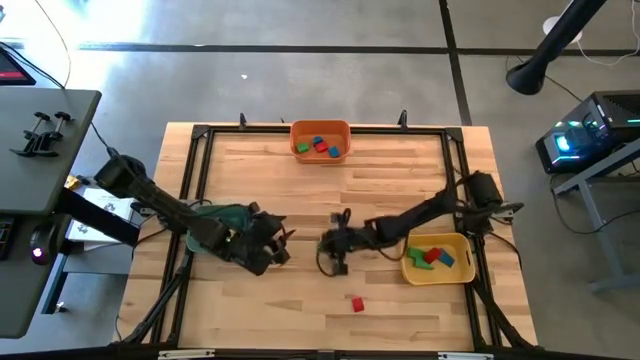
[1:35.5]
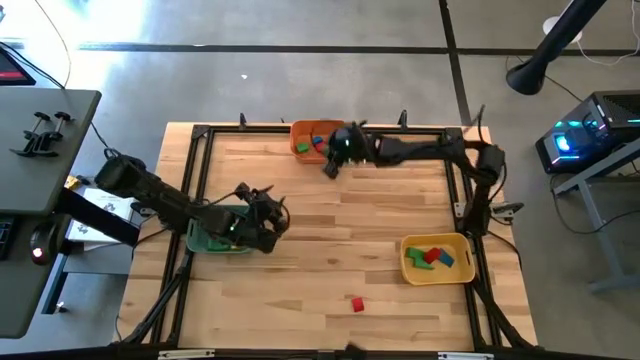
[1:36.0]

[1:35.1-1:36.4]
Task: Sort blocks by size
Put the green half cylindrical block into the orange bin

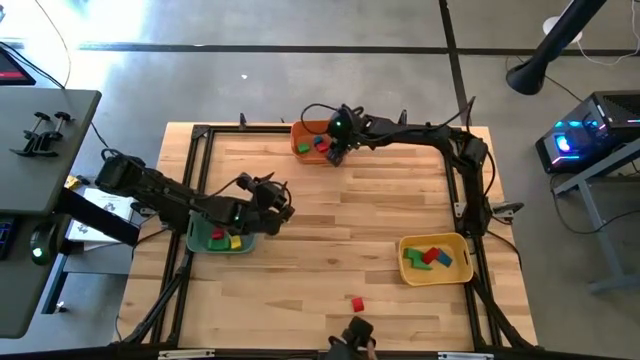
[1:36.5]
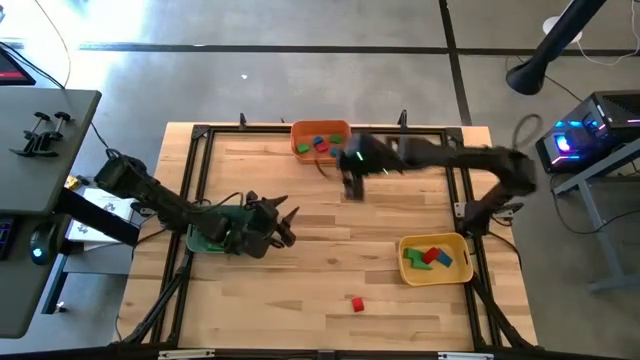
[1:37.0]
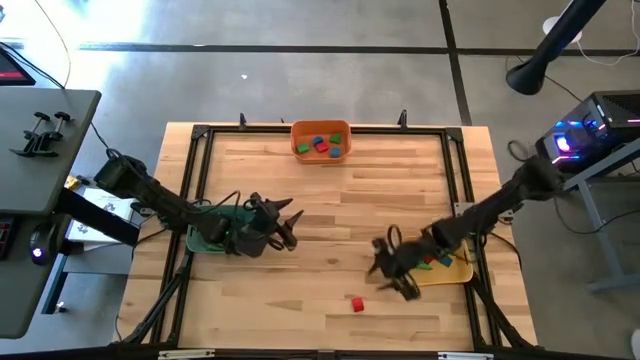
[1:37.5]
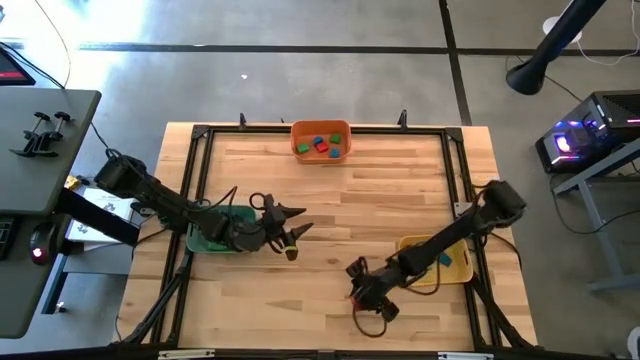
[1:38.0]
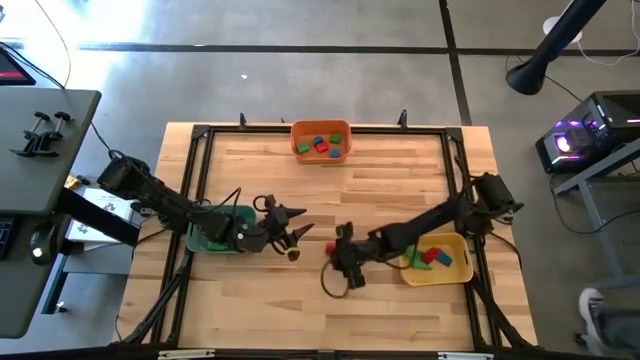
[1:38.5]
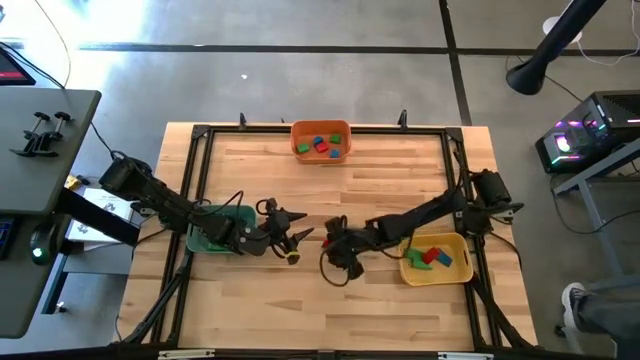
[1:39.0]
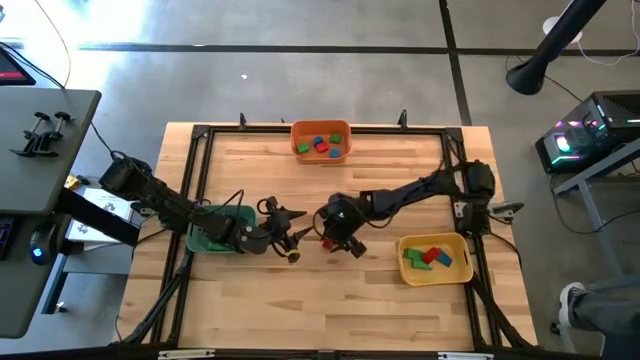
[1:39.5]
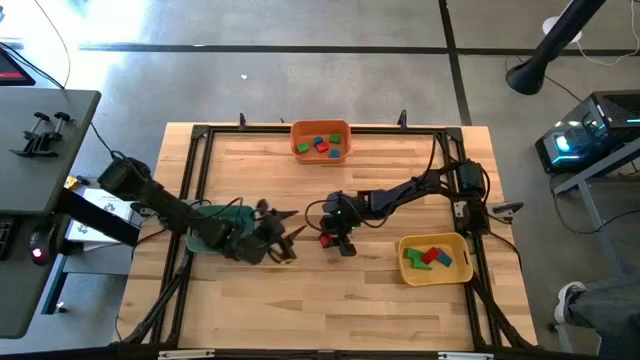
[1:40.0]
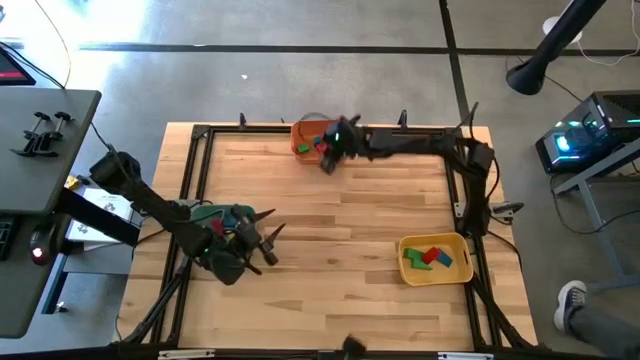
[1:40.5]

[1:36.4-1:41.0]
Put the red half cylindrical block into the orange bin

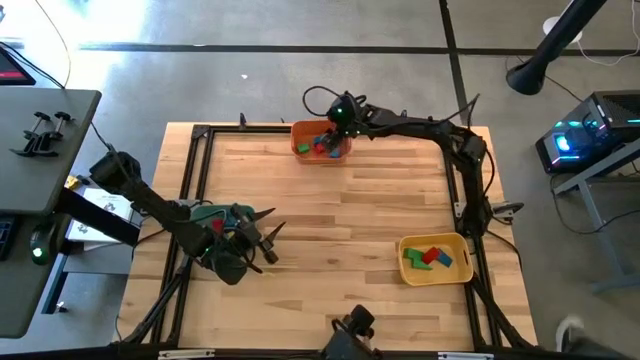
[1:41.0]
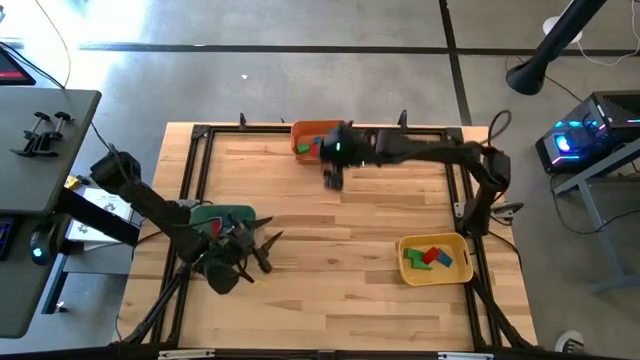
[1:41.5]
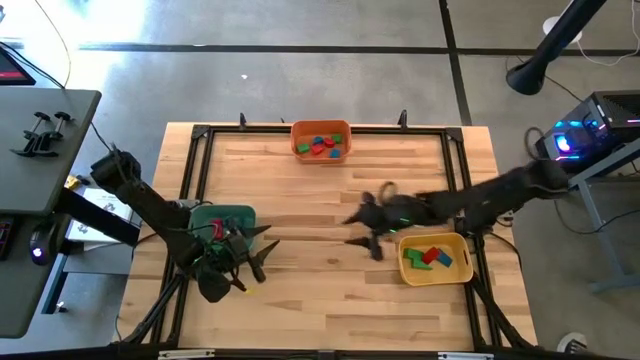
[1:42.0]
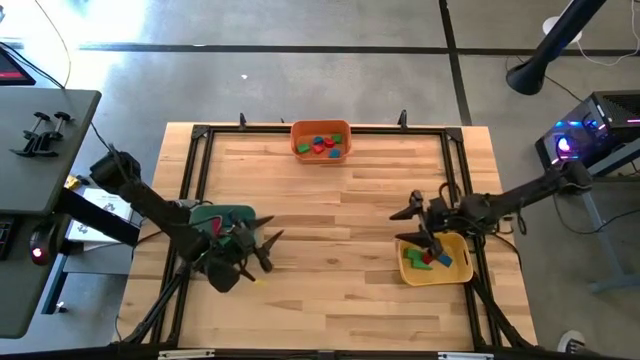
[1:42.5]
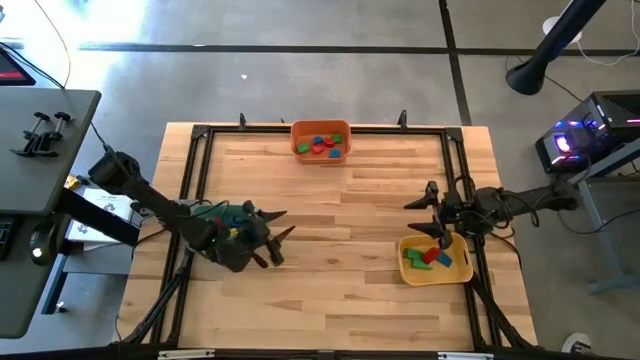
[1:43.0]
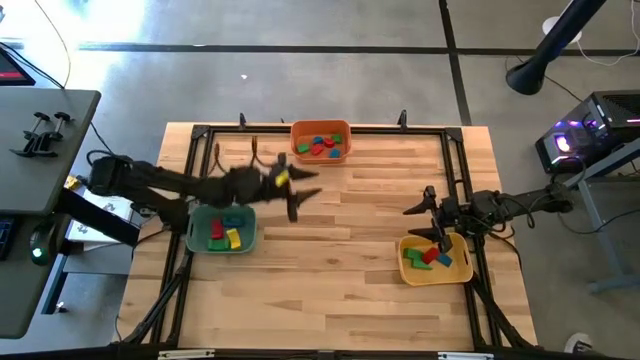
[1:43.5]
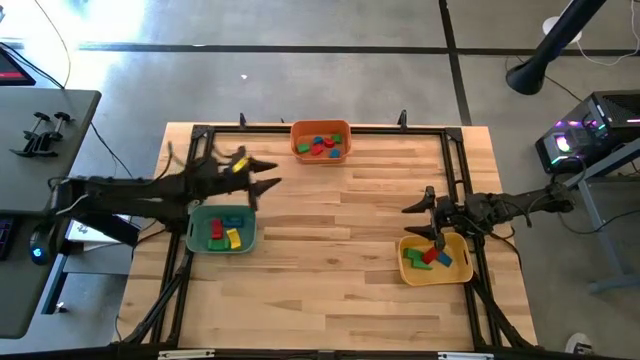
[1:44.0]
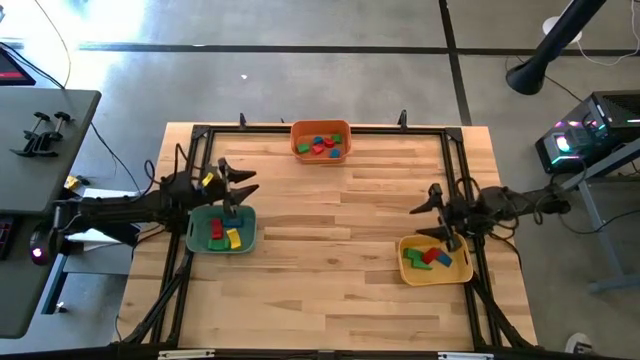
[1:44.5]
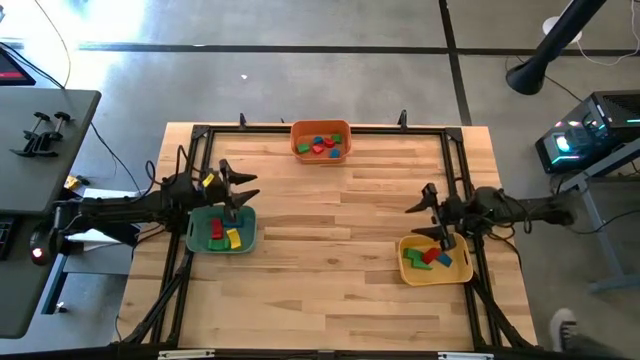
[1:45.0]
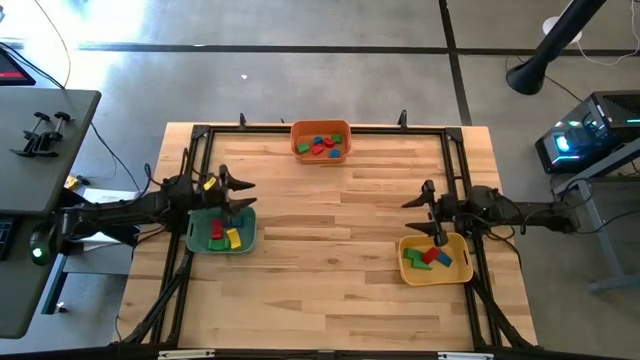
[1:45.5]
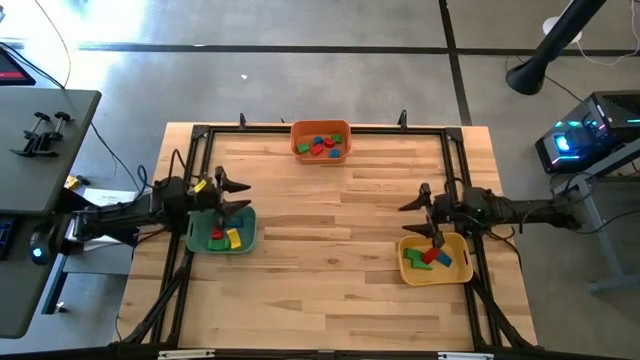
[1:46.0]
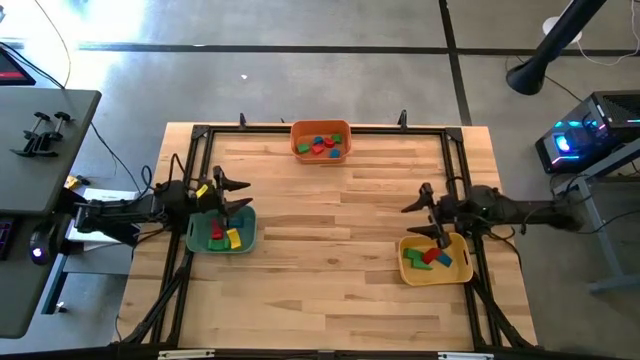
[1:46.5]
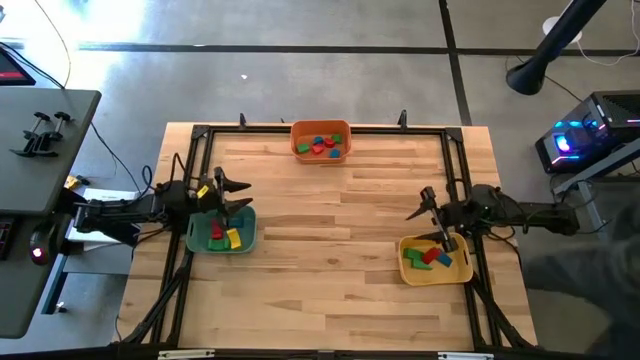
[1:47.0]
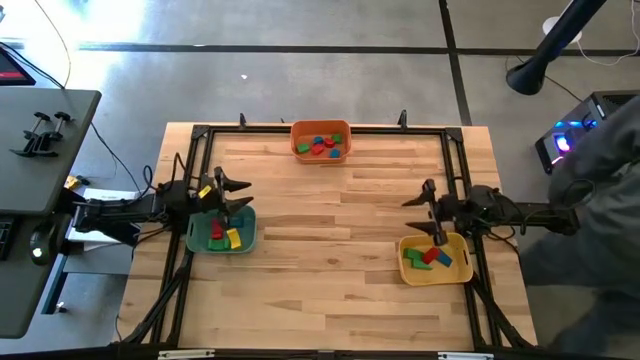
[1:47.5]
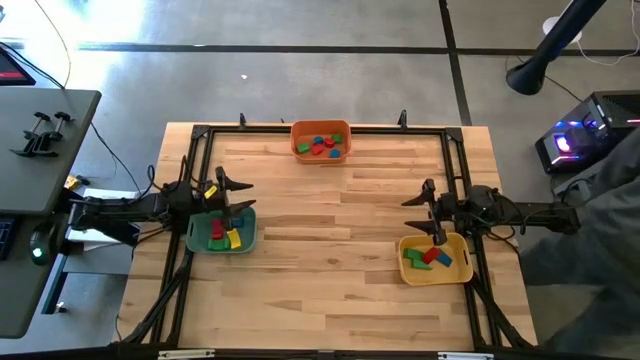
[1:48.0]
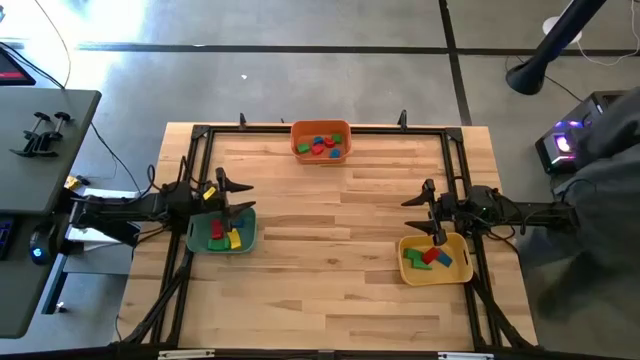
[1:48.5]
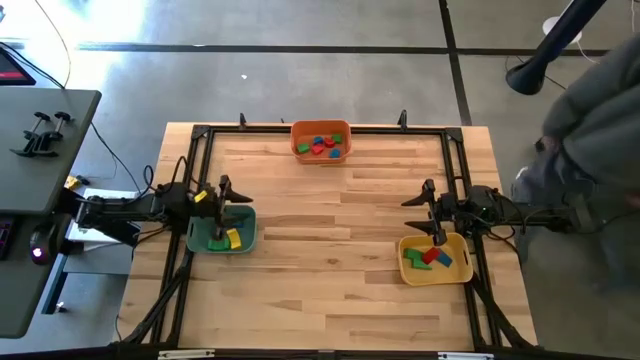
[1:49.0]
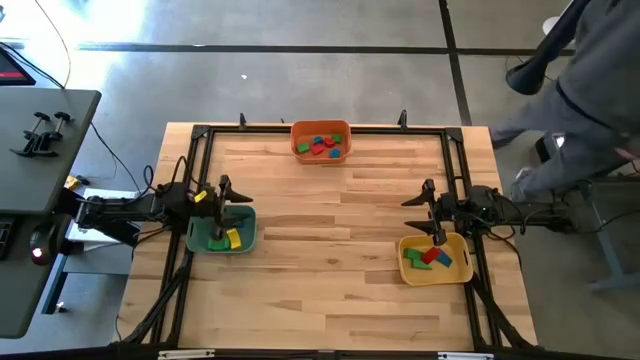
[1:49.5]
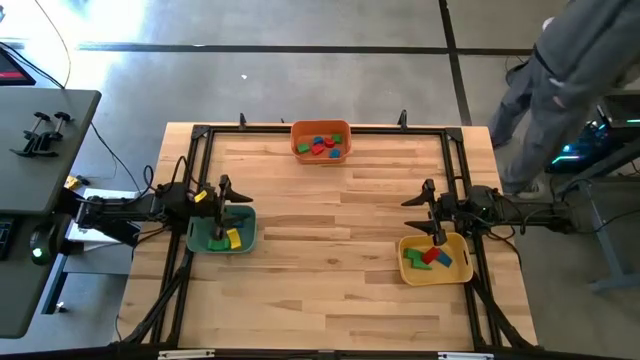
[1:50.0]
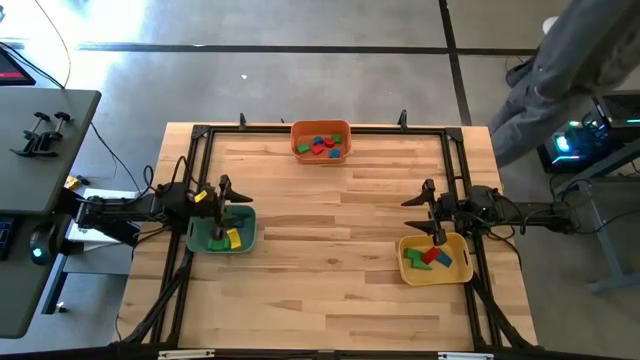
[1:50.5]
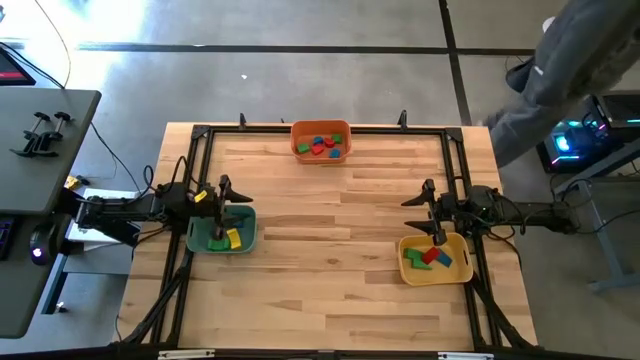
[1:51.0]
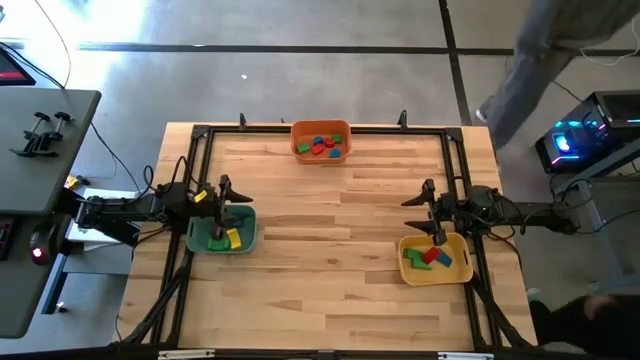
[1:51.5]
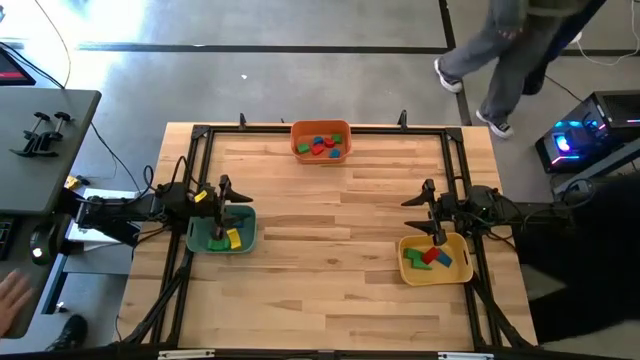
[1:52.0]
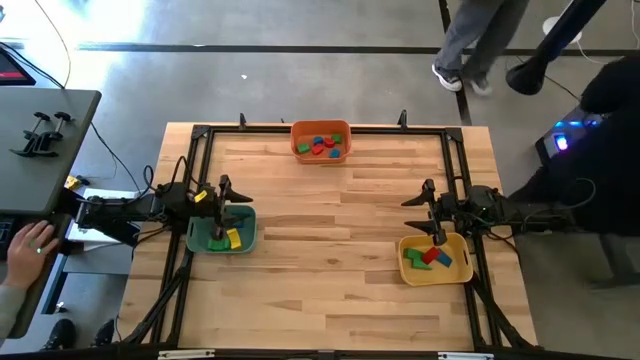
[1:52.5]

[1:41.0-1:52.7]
Return to Home Position

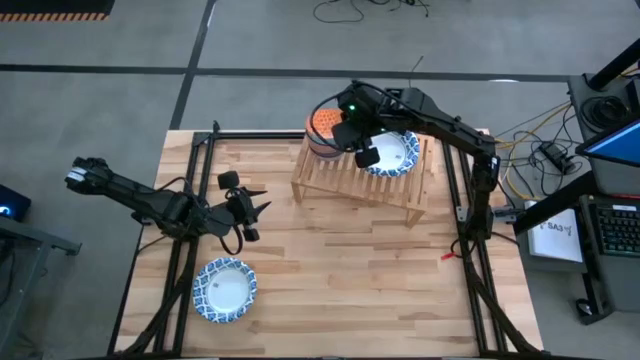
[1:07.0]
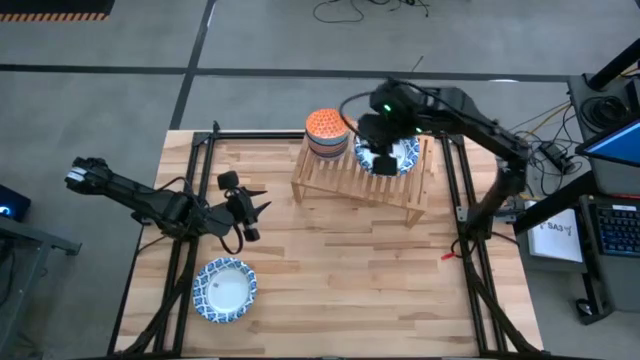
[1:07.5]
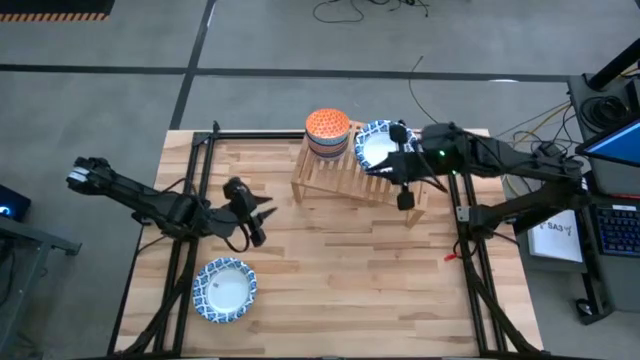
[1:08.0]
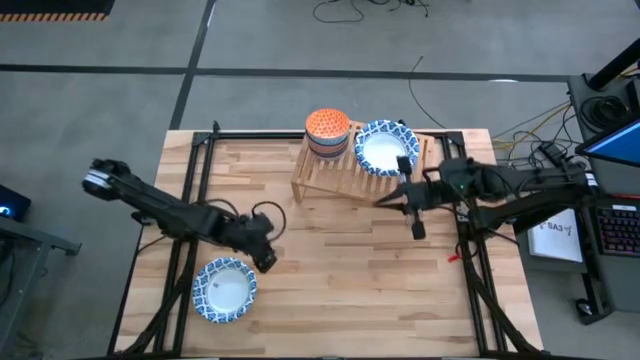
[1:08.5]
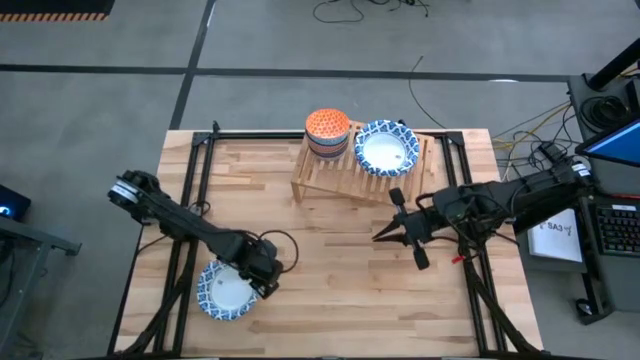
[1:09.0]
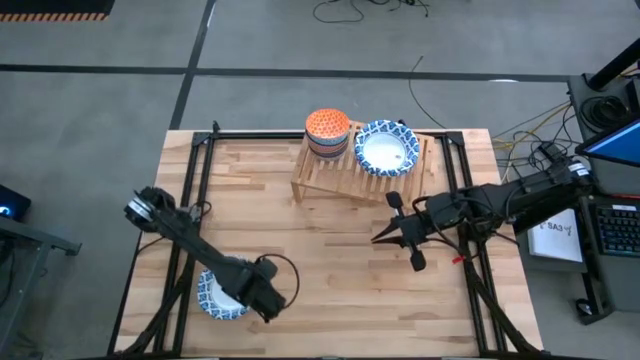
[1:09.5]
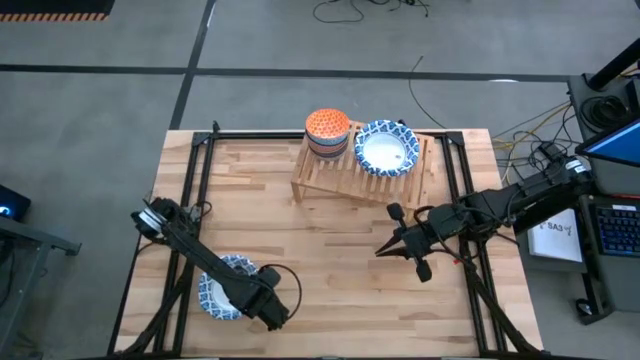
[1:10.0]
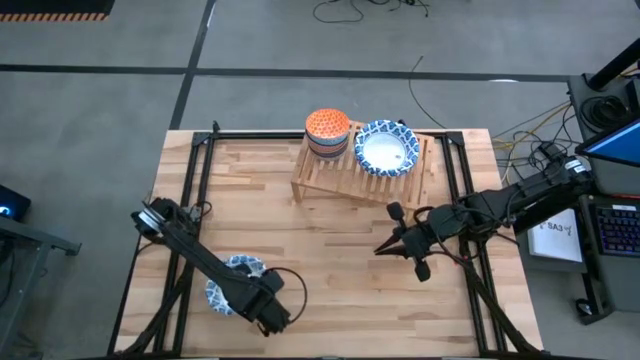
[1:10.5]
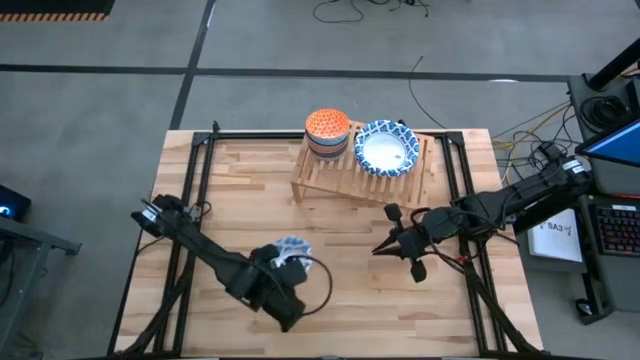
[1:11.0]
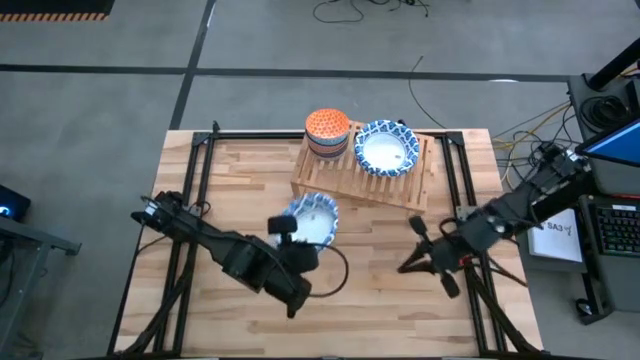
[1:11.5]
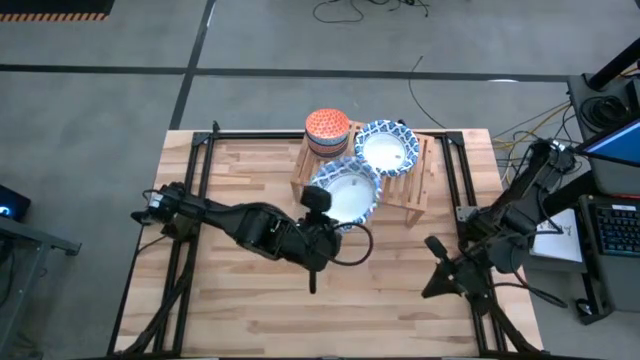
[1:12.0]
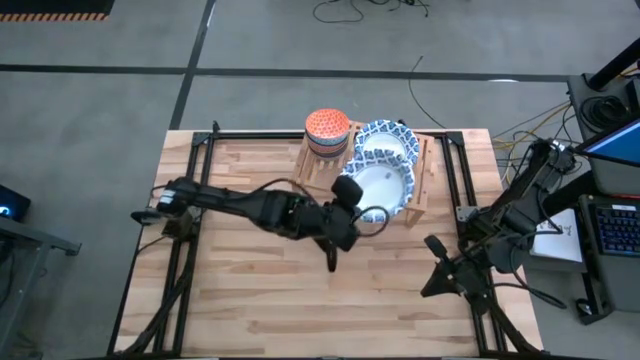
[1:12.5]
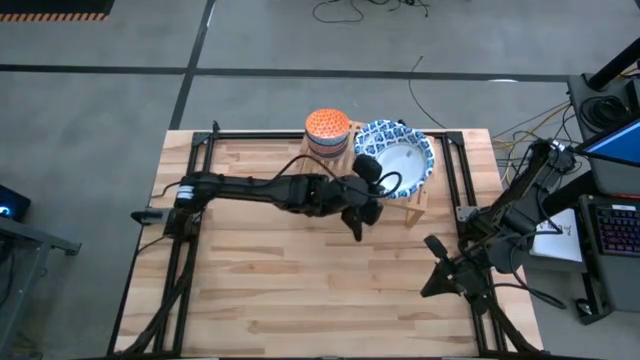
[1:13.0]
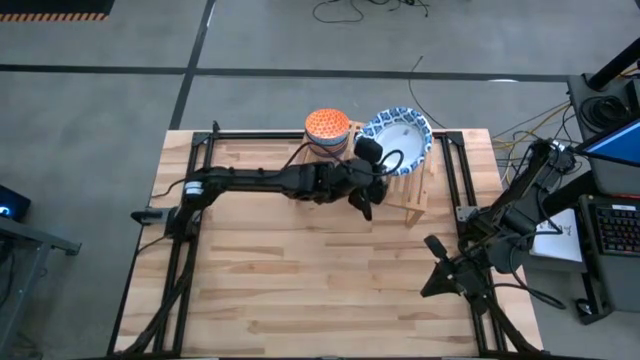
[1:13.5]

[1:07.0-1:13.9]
Task: Place and stack bowls onto a shelf
Stack the white pattern bowl on top of the other white pattern bowl
